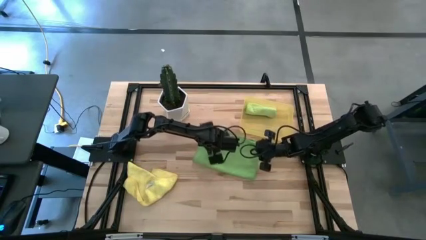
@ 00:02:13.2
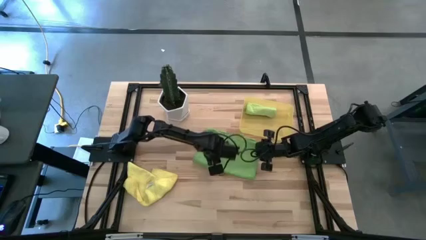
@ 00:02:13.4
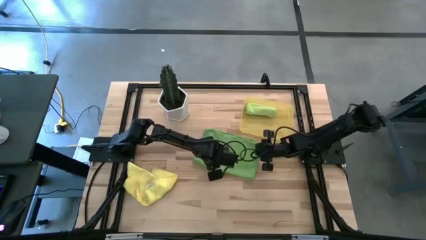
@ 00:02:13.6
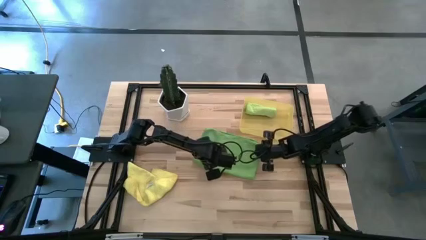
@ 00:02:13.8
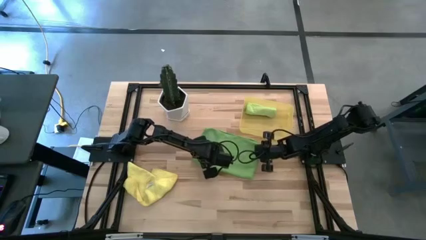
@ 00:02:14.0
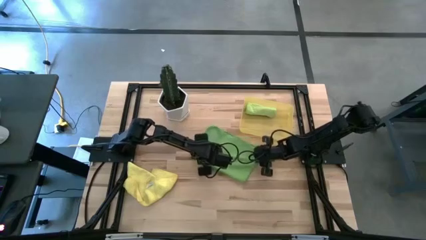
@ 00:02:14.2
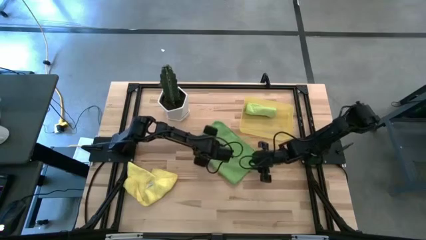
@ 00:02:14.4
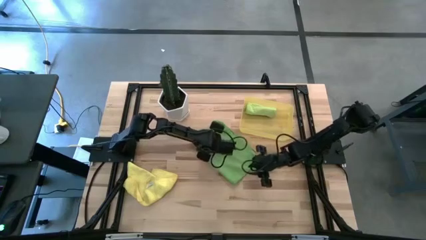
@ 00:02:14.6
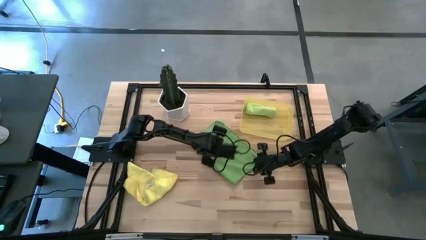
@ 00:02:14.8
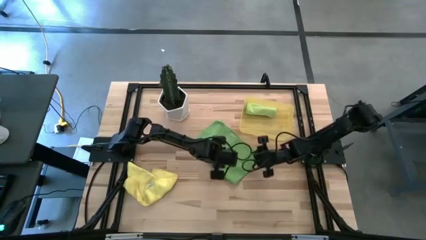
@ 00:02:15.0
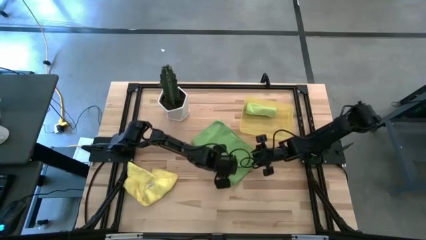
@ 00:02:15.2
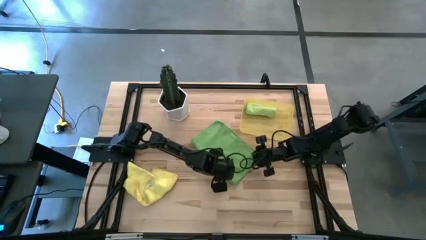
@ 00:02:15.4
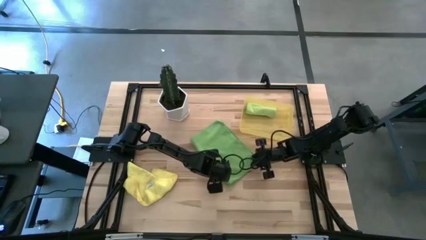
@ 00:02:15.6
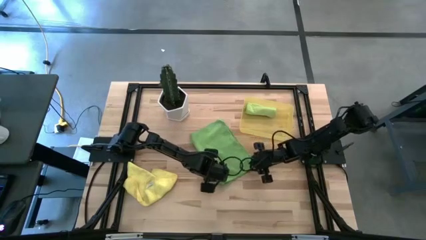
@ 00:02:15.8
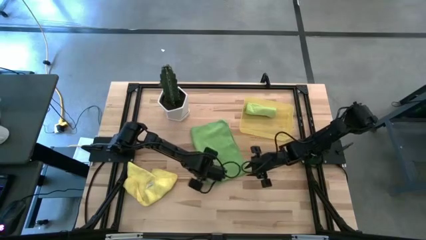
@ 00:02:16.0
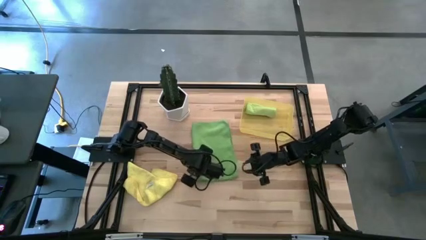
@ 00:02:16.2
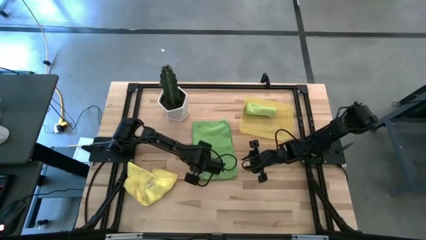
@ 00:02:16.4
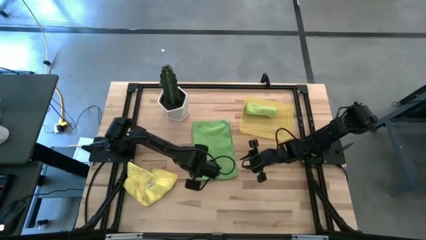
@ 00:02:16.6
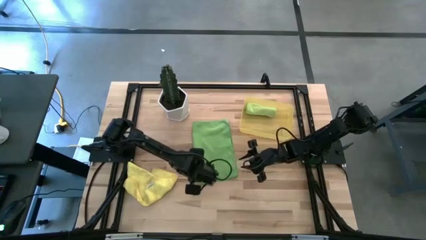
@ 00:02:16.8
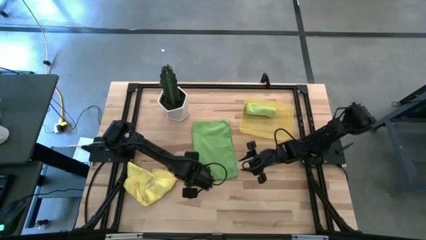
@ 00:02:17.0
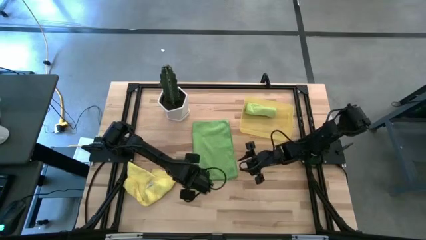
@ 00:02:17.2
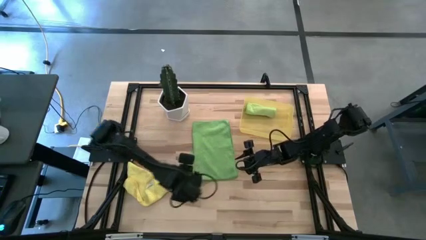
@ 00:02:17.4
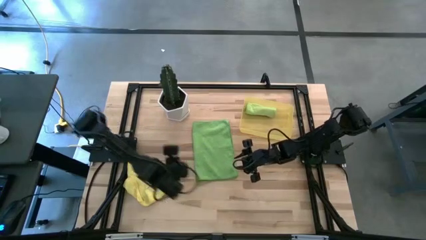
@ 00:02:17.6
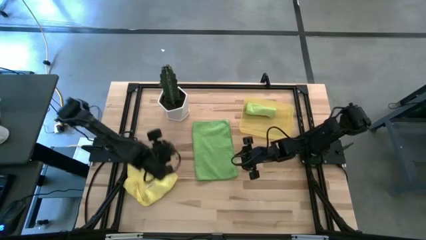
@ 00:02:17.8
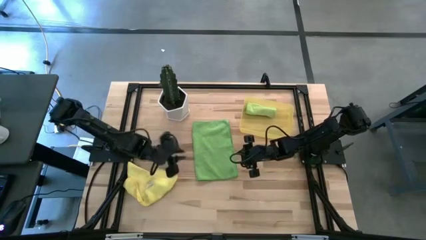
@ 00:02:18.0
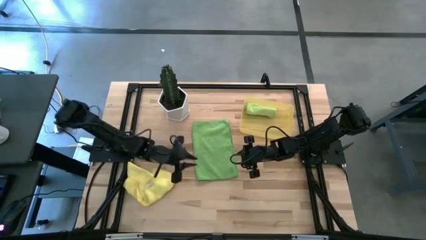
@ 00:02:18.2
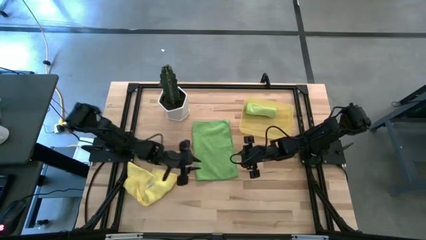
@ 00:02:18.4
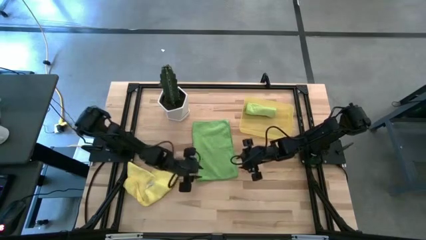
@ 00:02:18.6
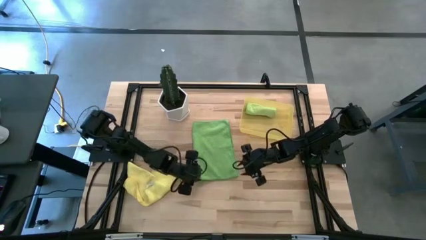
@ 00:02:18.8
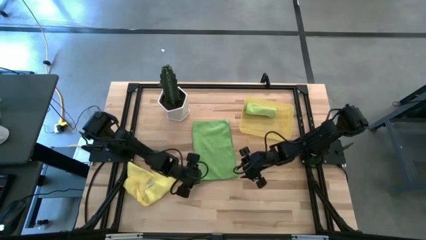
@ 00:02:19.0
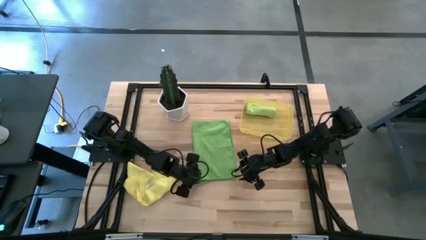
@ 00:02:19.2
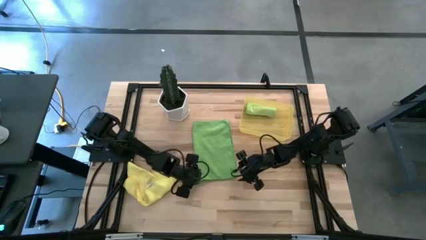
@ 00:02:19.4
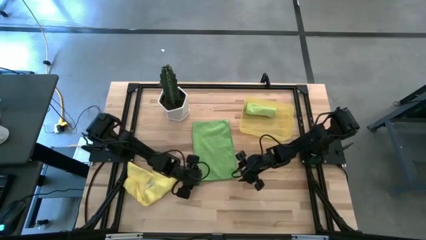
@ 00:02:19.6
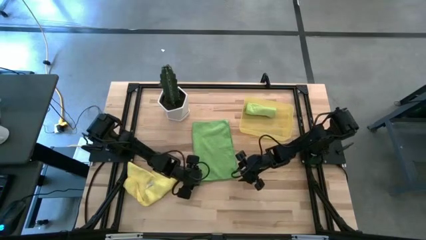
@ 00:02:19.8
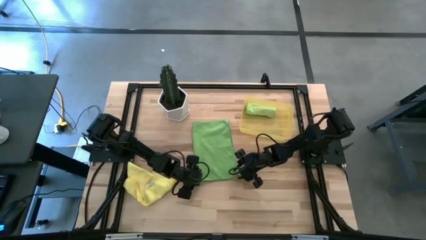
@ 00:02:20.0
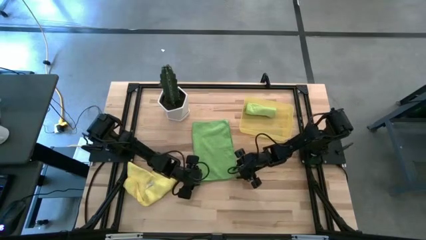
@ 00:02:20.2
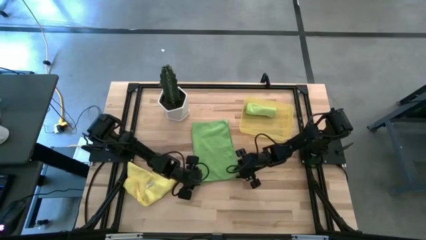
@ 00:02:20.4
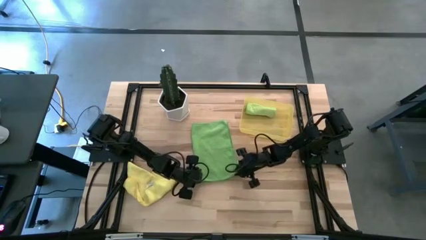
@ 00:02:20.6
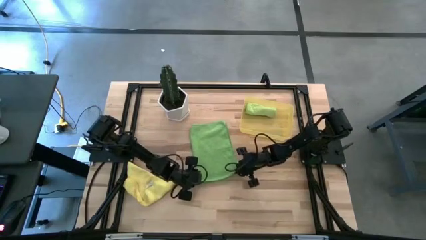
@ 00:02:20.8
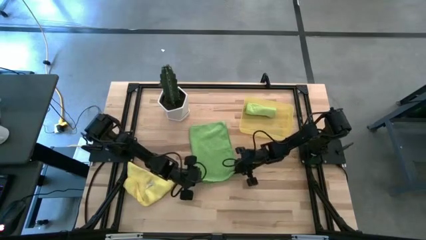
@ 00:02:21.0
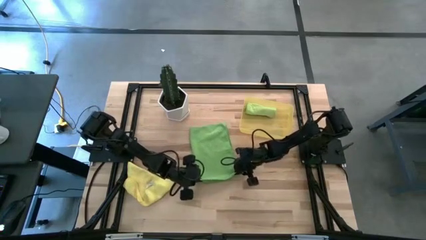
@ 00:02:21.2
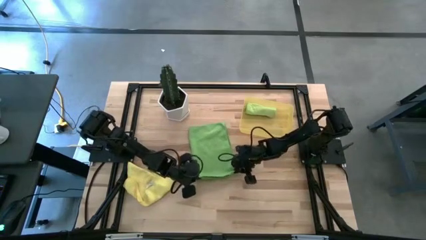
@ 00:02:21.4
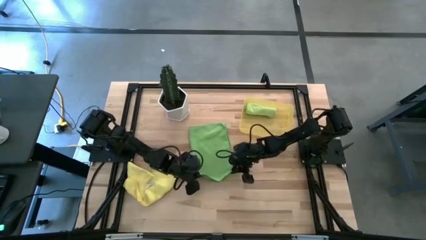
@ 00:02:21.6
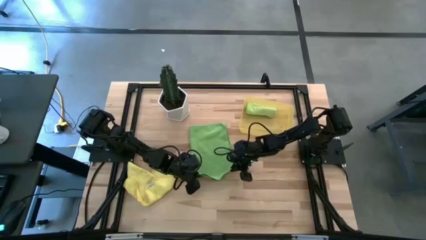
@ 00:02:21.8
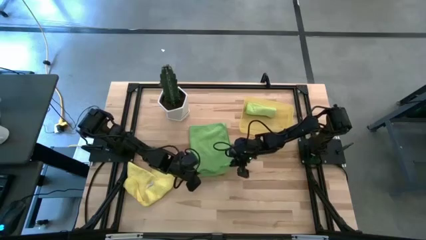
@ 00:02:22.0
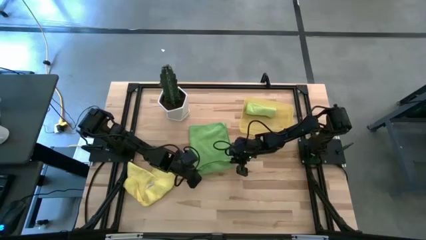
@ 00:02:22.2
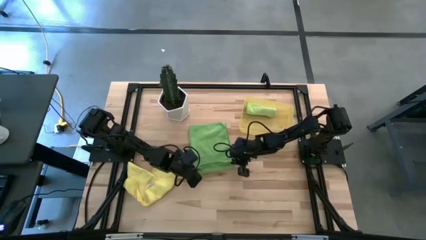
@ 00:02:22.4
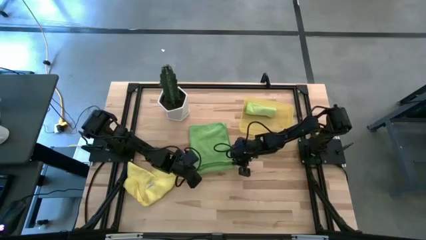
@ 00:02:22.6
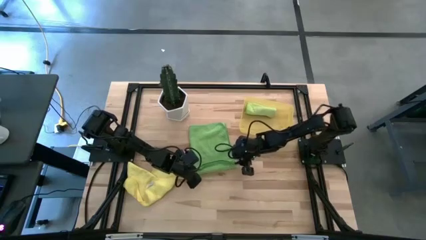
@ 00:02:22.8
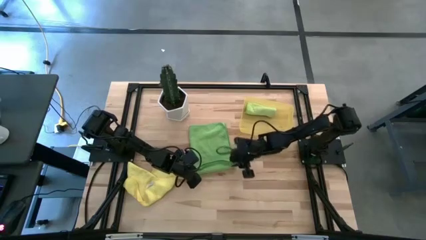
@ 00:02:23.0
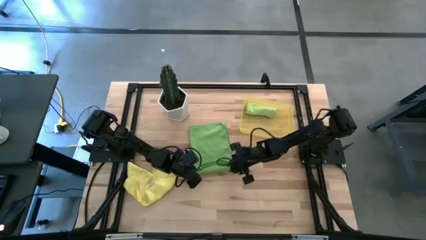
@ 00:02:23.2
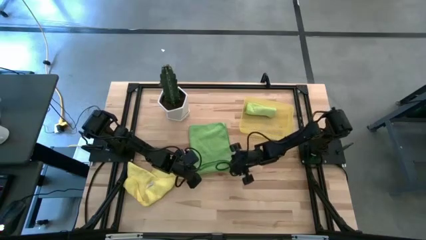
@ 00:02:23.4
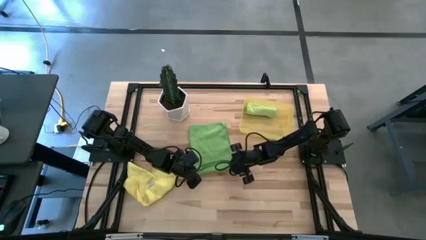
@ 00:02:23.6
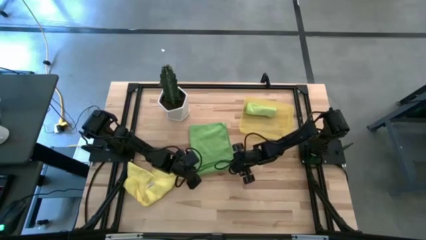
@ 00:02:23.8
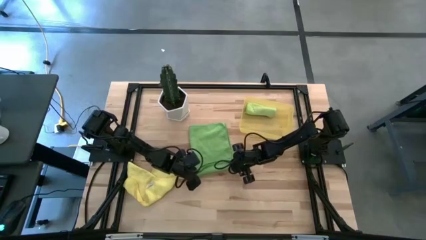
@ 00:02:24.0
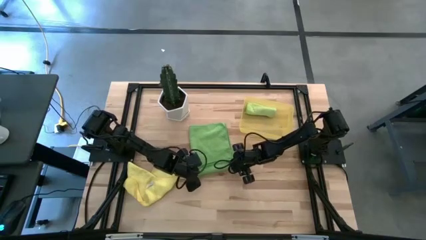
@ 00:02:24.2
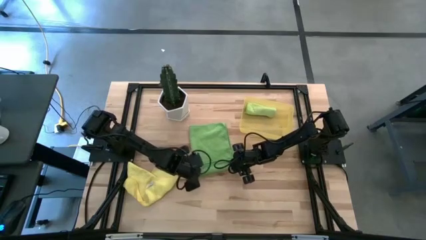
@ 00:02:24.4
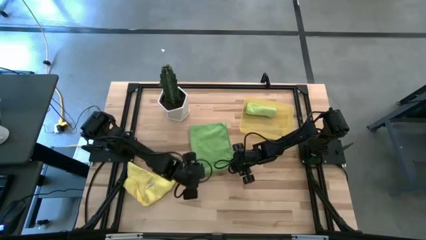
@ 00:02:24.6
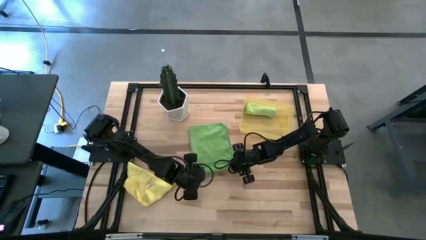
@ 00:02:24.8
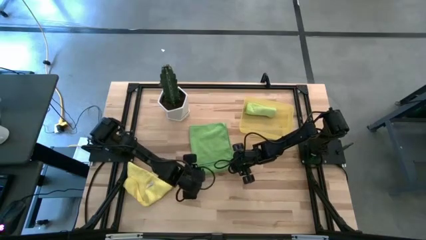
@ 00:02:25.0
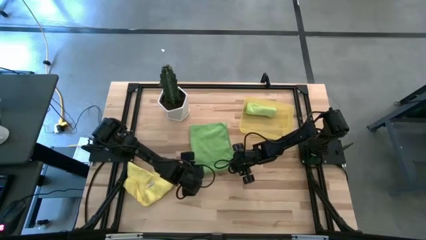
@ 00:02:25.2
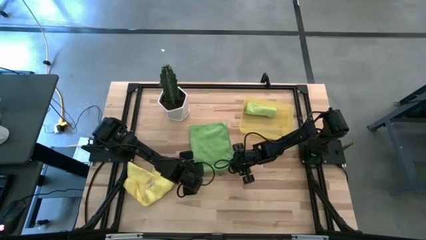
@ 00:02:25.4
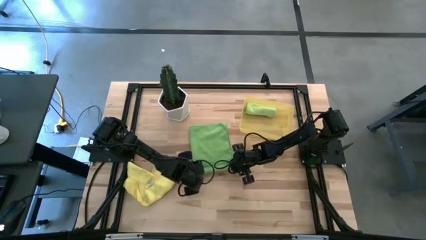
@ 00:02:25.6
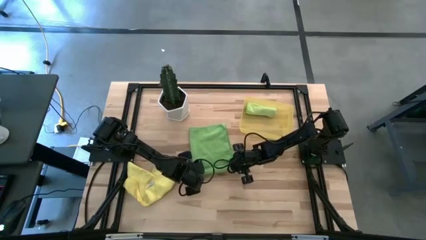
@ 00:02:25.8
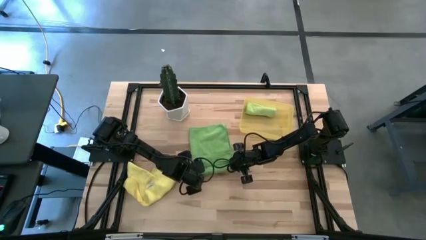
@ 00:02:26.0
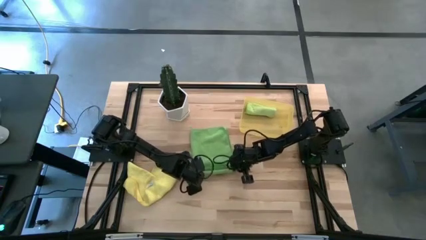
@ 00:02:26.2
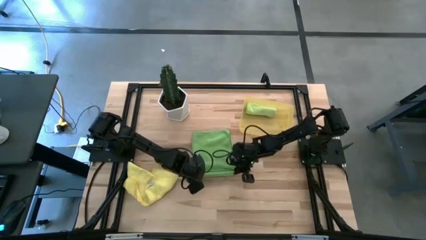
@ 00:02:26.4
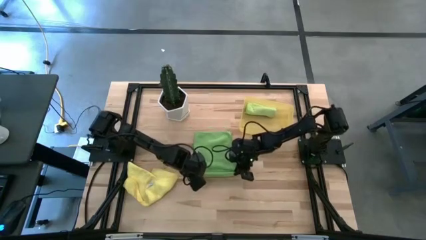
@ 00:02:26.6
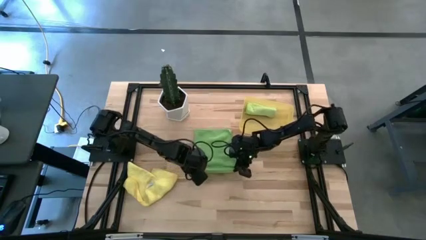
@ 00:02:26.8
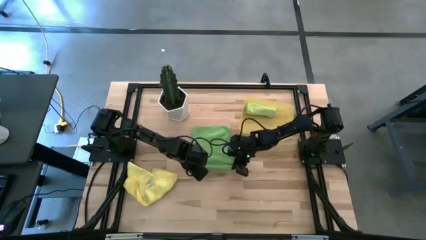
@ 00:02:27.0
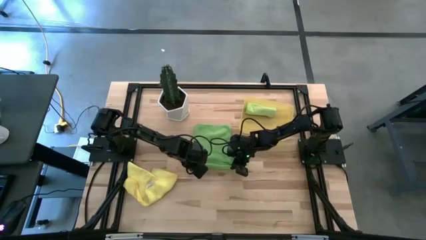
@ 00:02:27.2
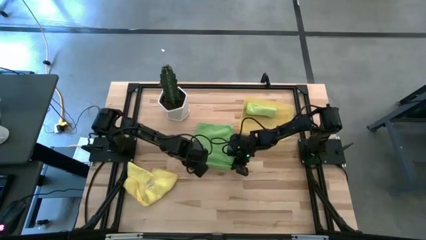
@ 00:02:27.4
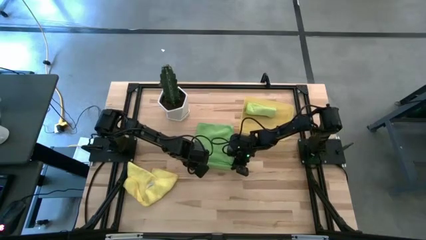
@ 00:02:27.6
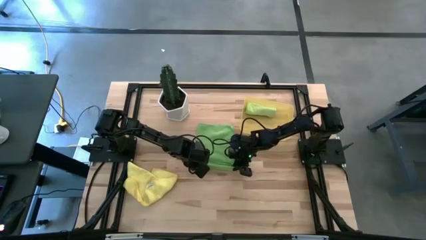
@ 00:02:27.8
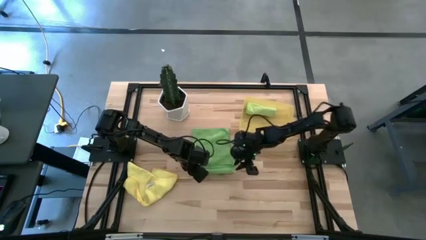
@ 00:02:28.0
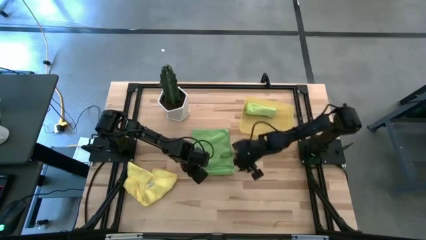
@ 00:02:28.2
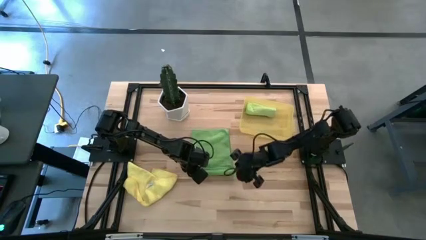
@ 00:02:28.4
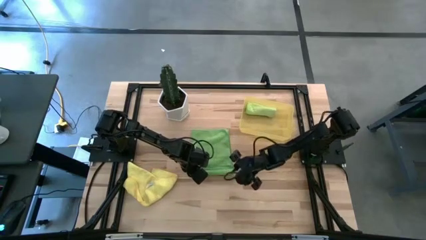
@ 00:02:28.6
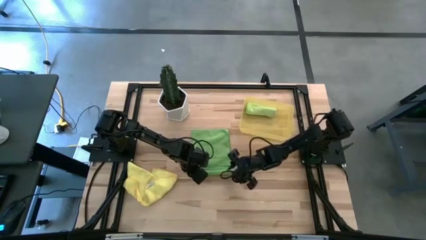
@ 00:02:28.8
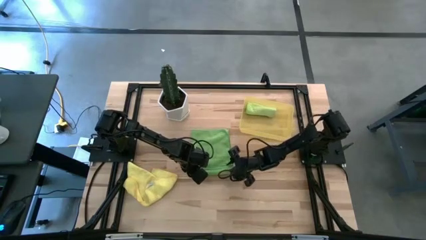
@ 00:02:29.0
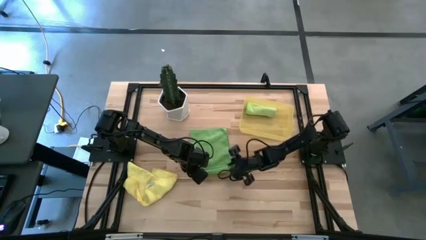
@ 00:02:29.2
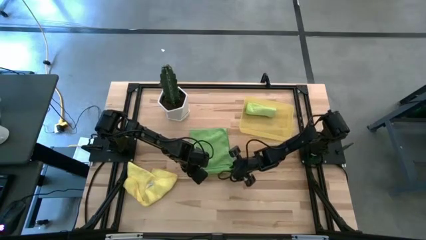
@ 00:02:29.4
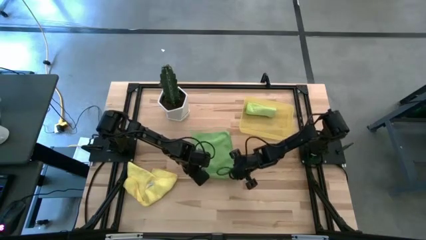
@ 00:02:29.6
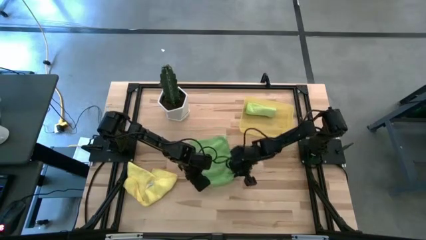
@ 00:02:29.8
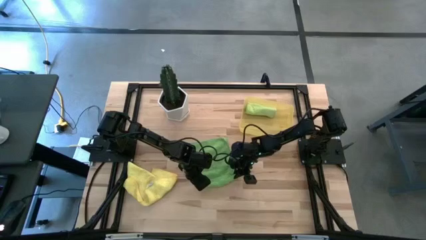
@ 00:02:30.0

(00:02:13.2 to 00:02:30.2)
Task: Roll microfiber towels into tight, uniform cylinder then place into a basket
Roll the green microfiber cloth
